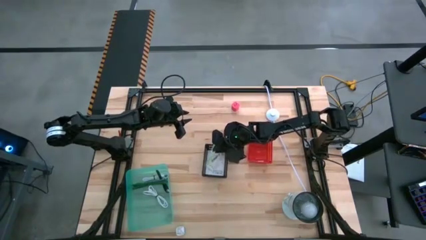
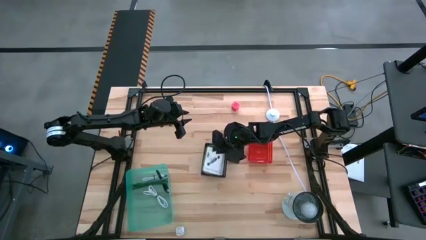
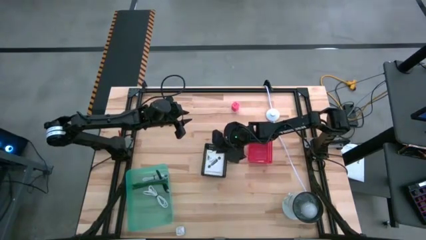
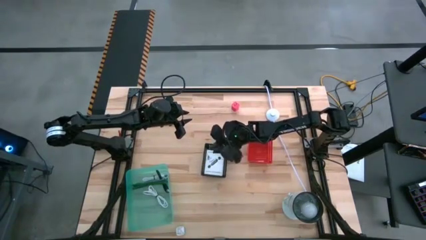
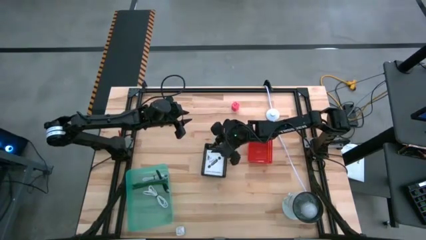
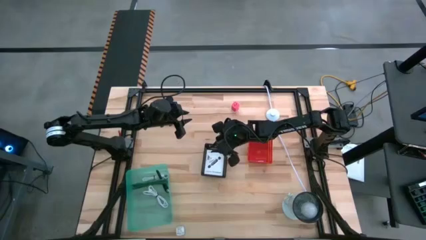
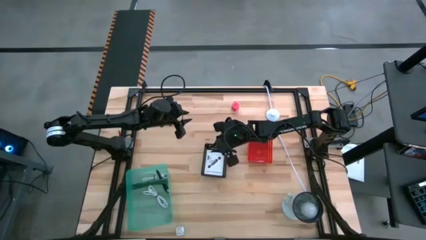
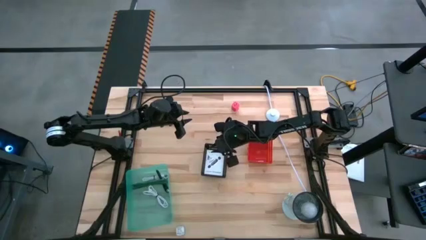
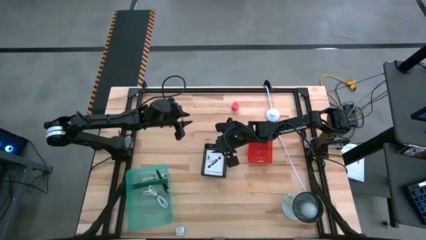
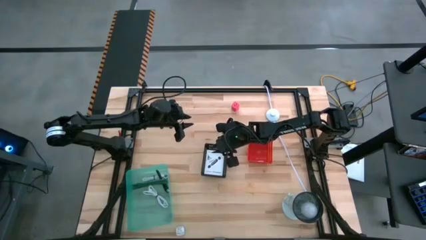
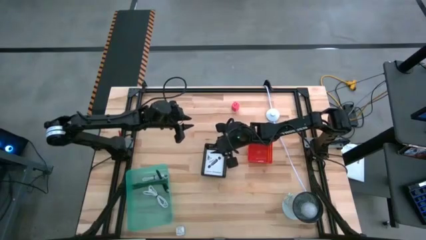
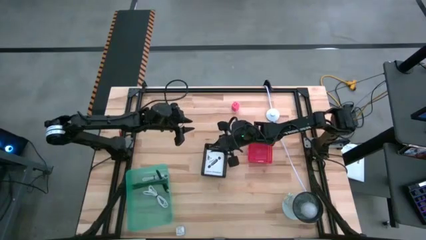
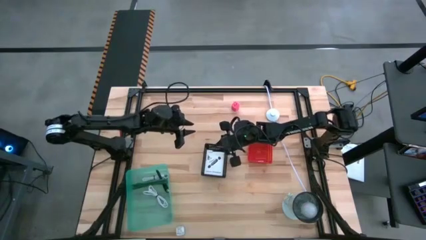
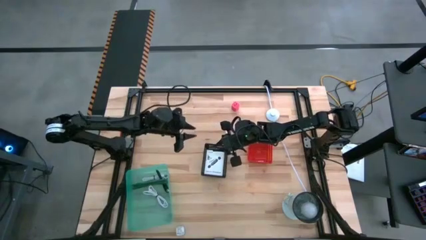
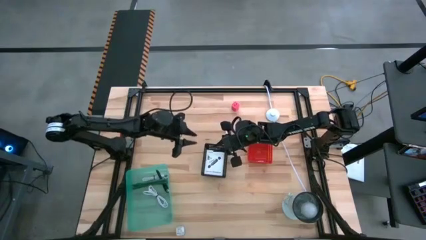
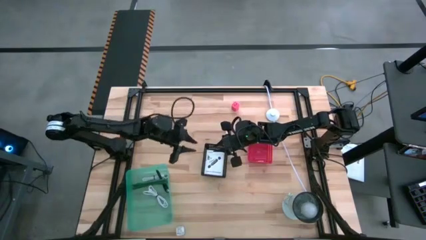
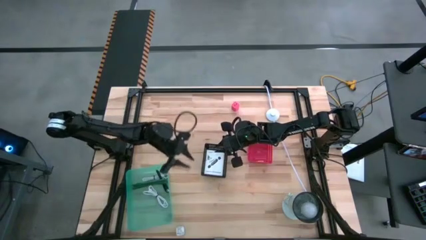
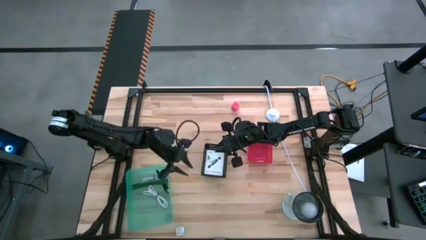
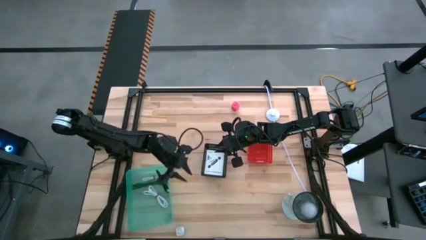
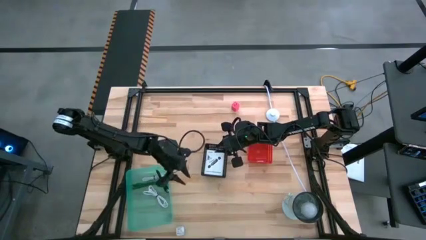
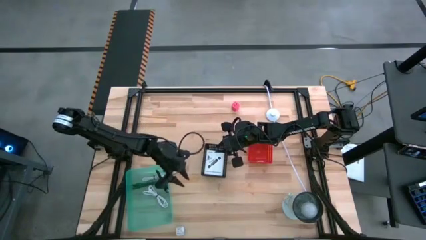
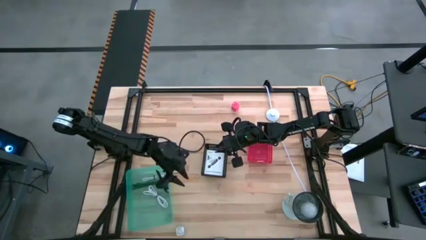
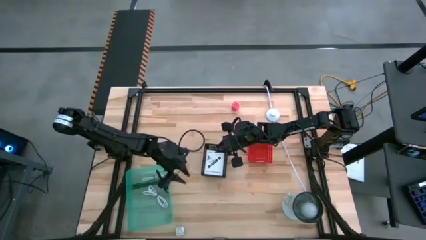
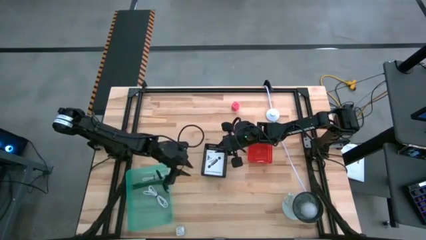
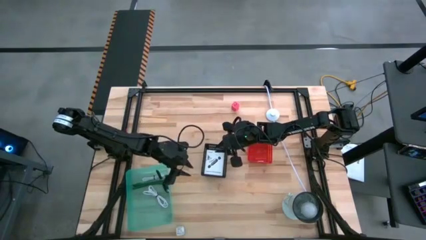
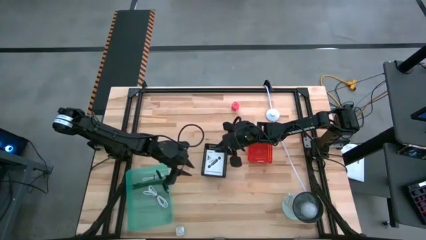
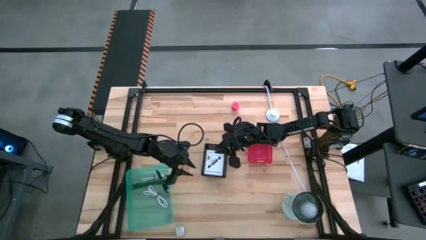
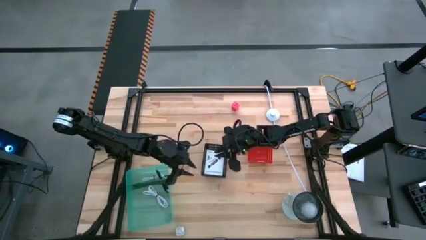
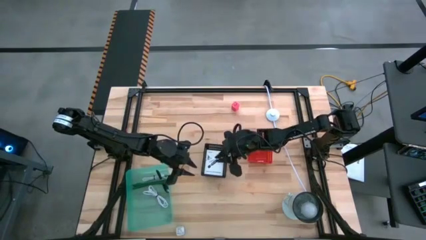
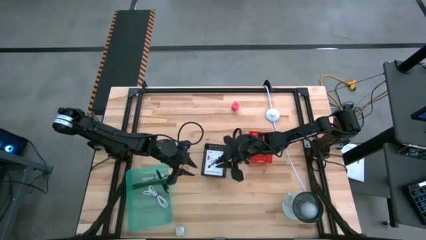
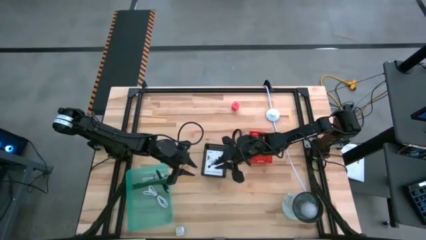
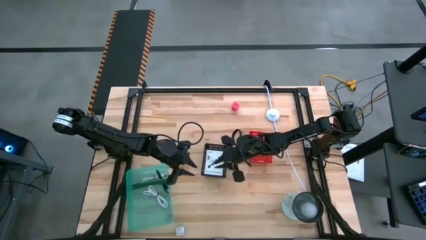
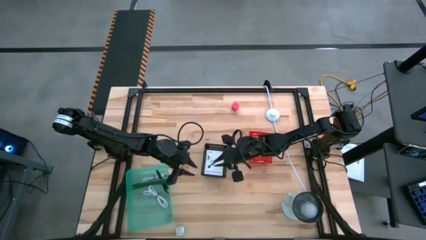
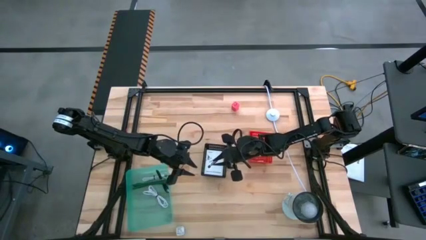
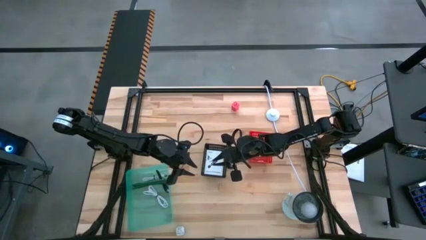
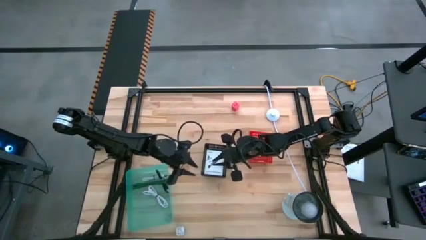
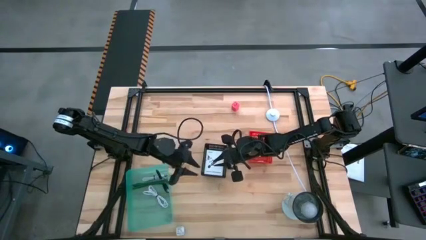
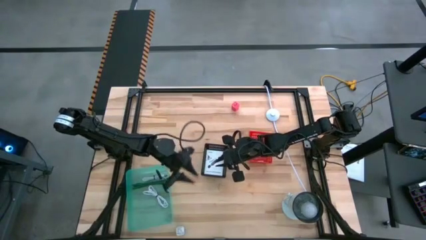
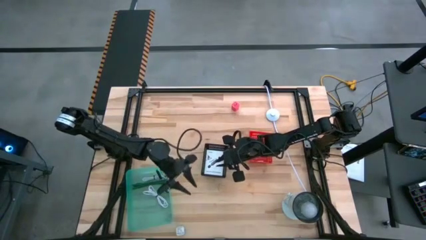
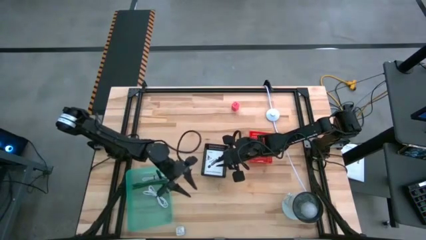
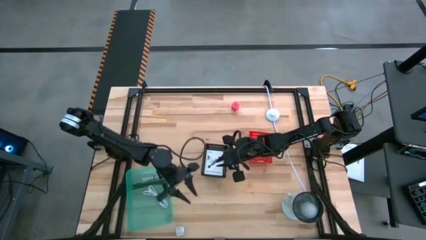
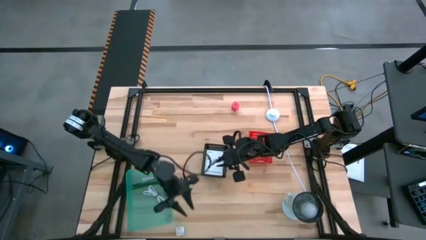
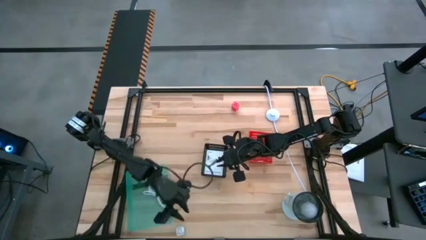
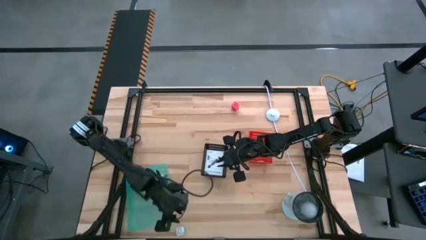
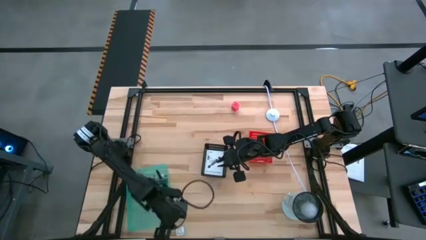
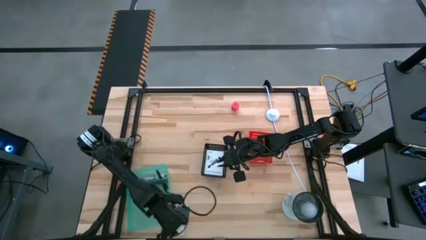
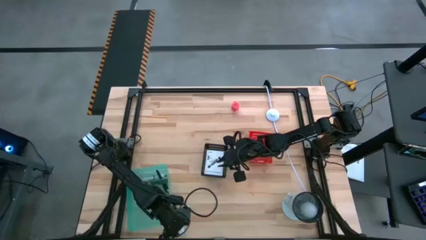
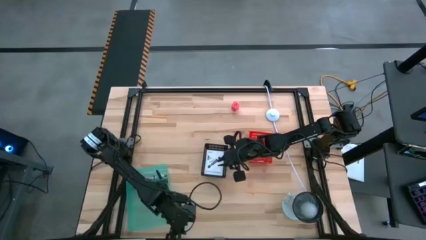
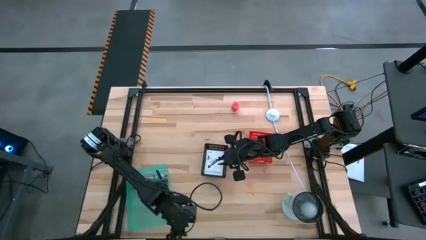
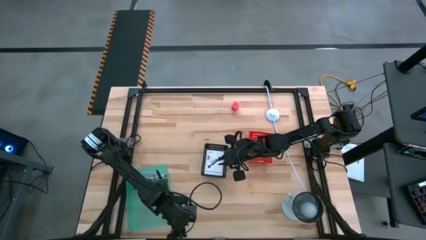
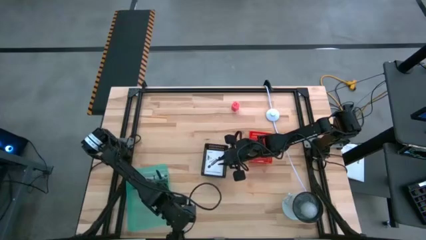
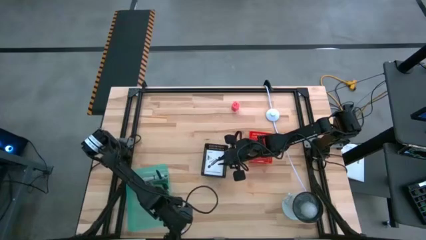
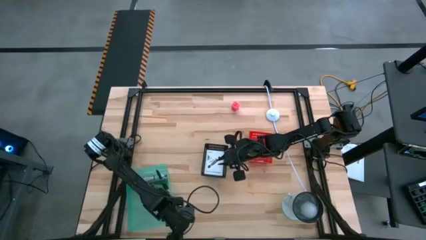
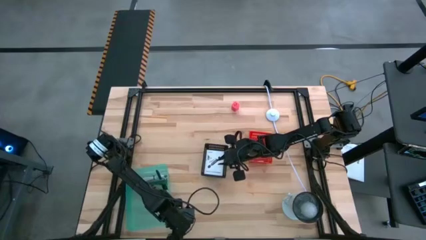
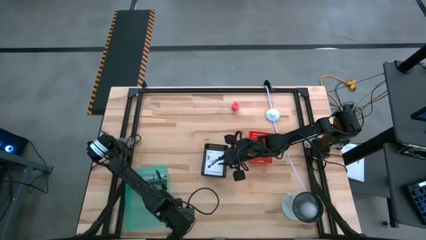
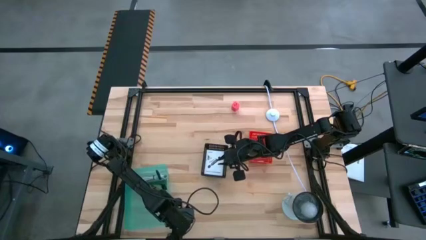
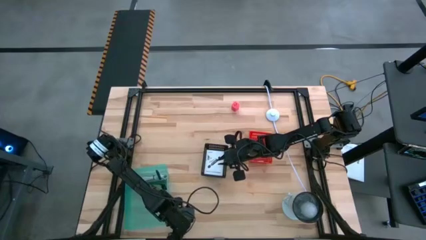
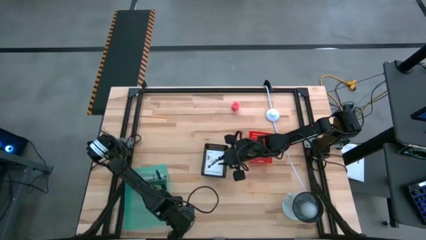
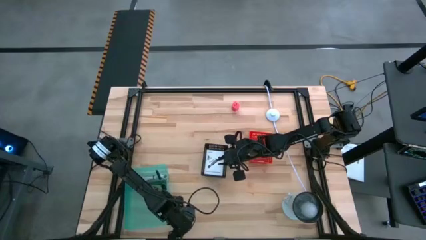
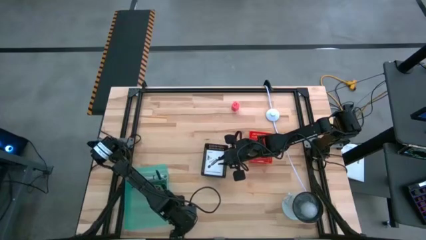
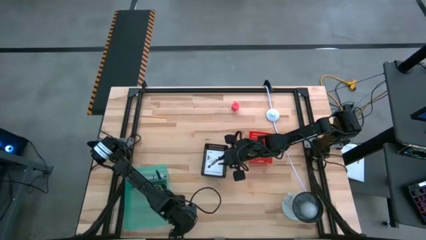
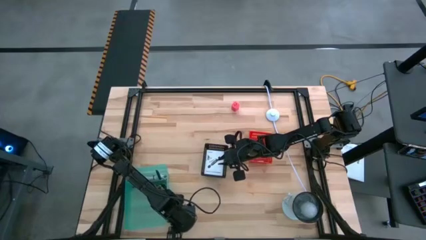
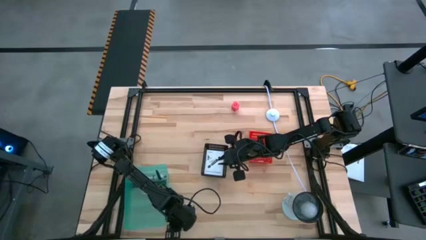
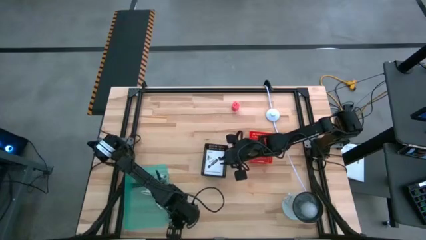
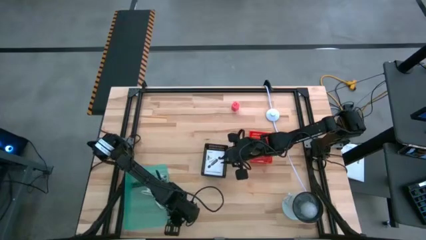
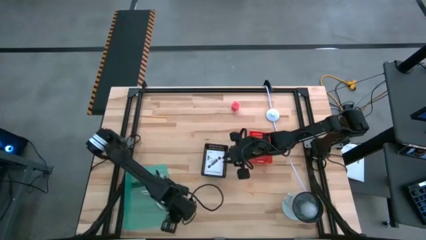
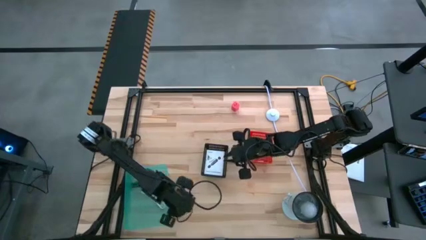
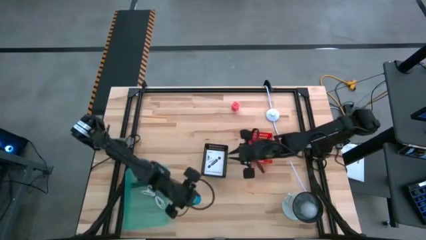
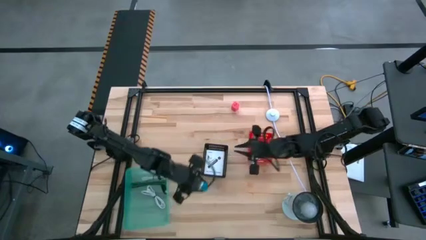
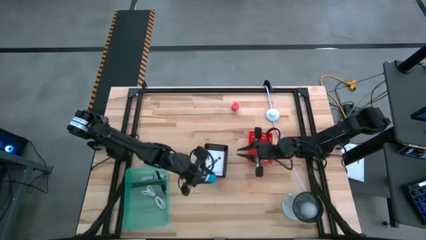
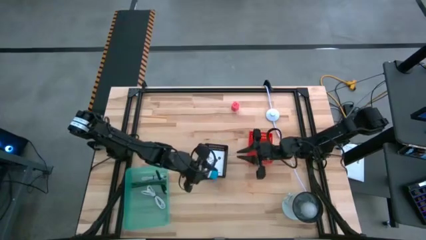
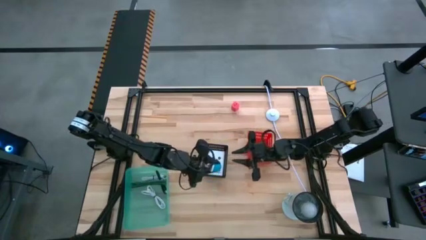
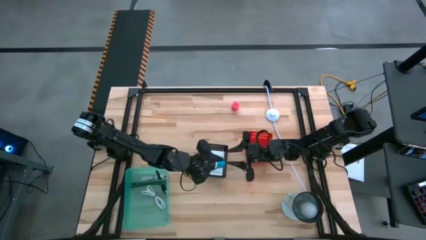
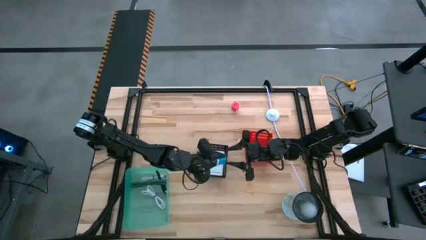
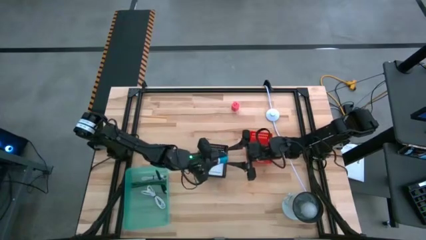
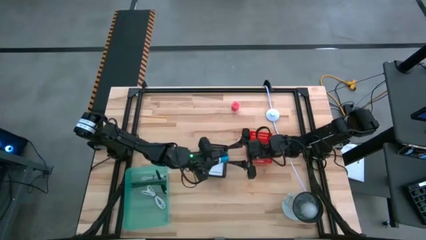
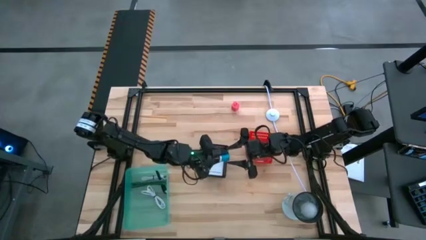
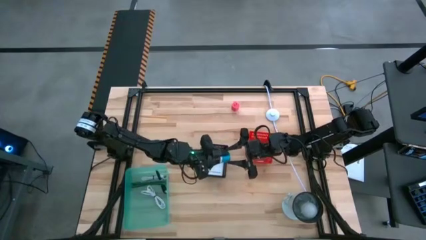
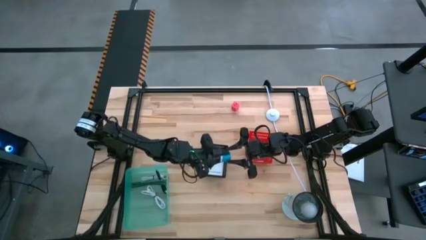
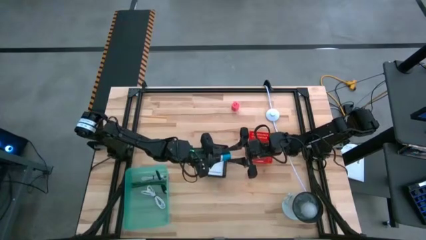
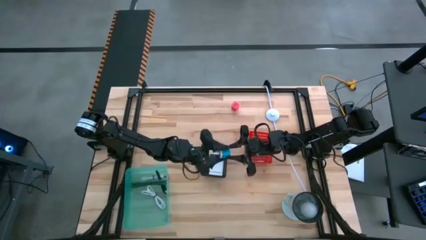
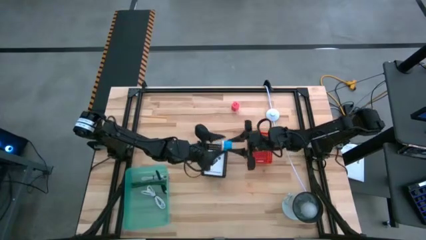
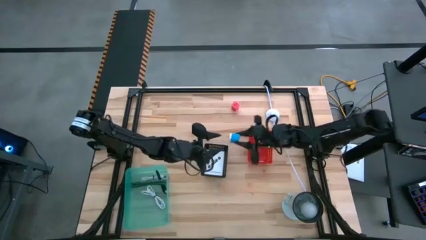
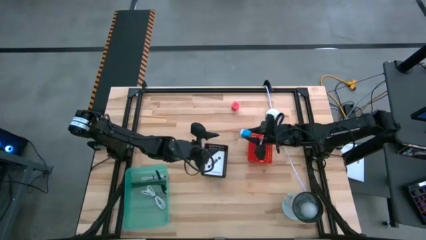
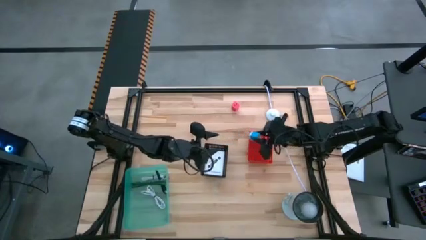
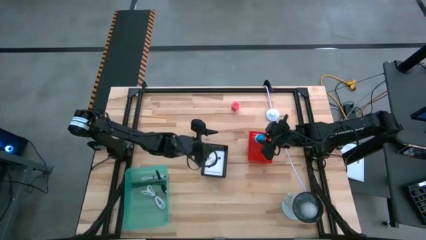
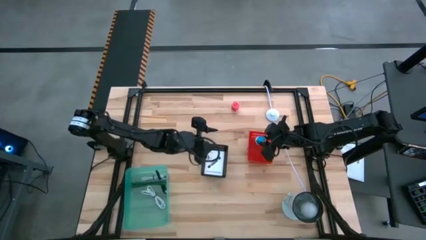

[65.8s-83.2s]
Task: Pick and place items into bin
Put the blue charger adapter into the red bin
